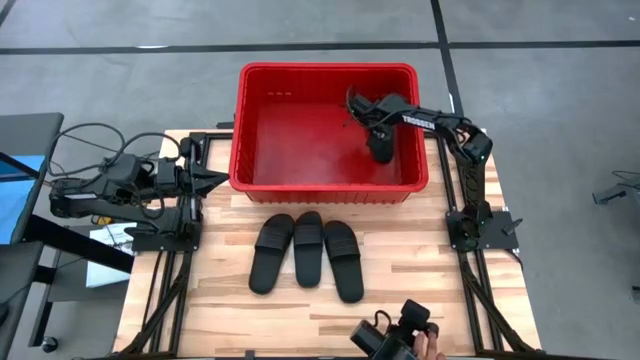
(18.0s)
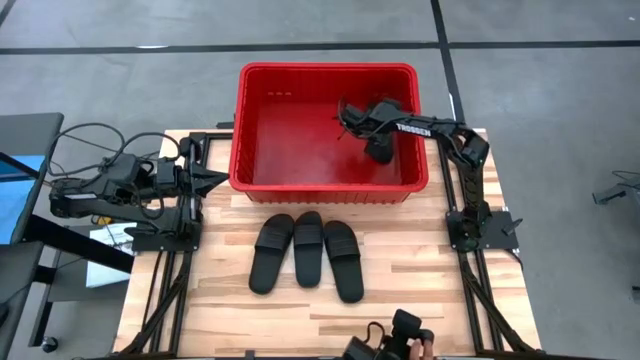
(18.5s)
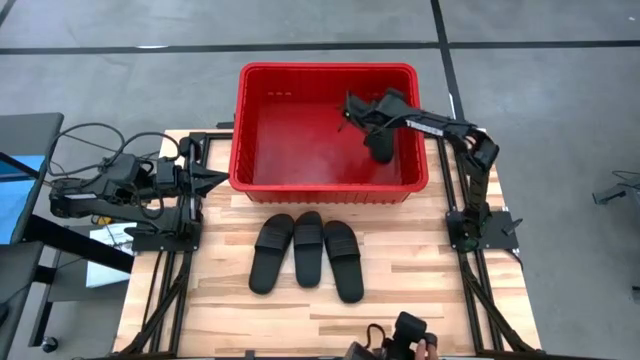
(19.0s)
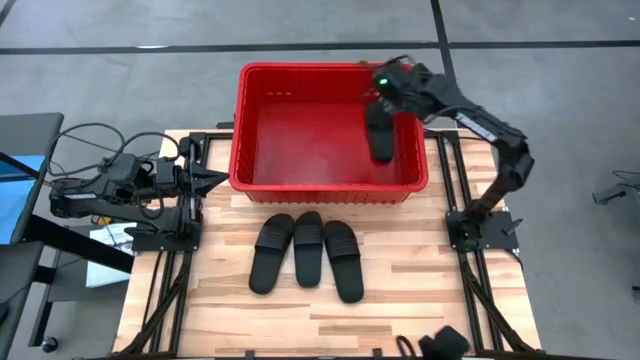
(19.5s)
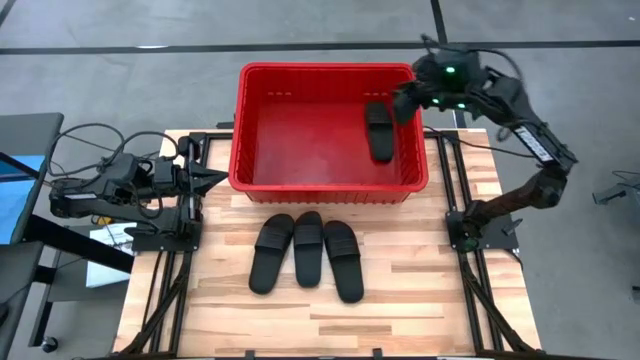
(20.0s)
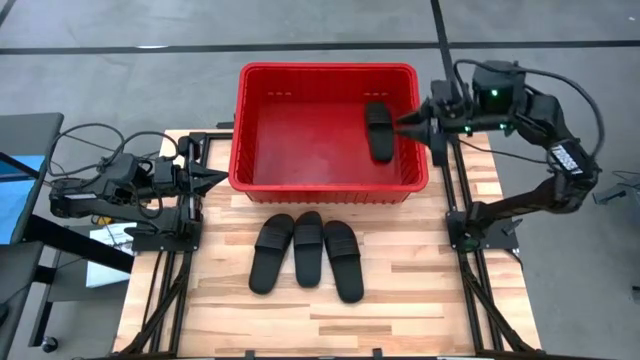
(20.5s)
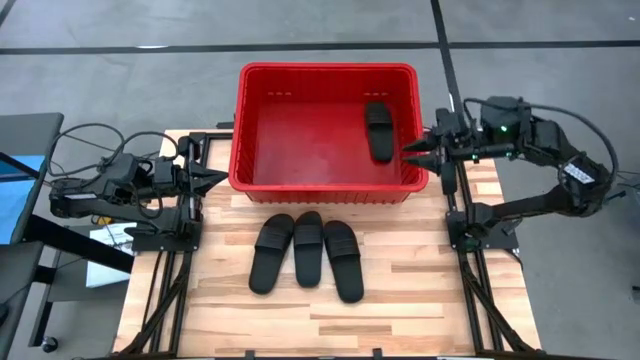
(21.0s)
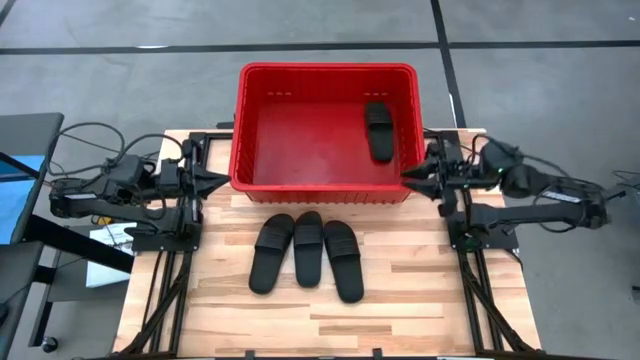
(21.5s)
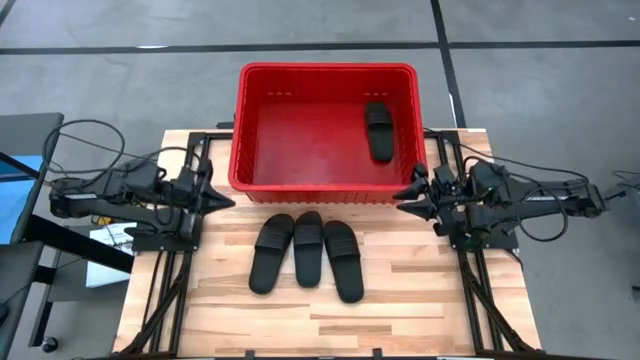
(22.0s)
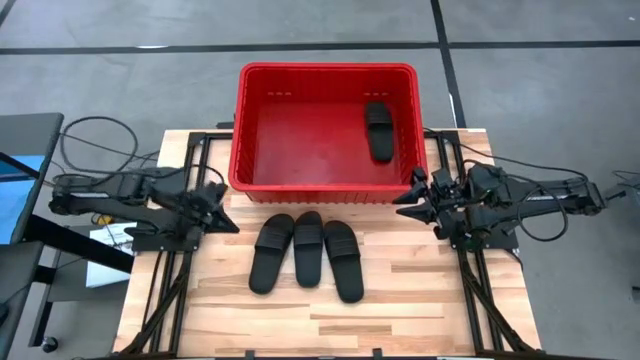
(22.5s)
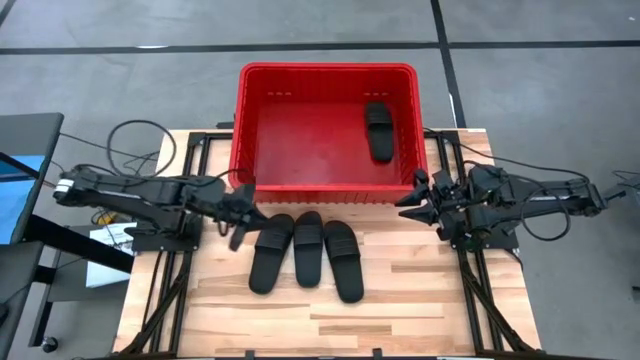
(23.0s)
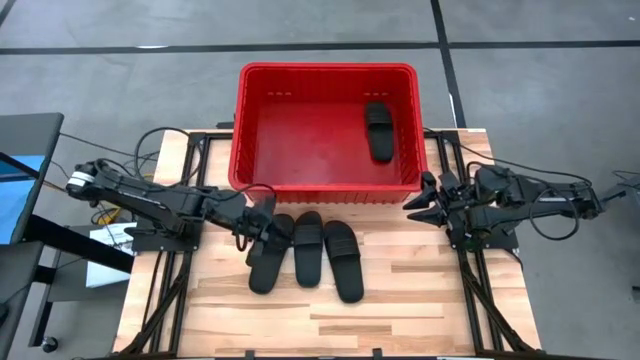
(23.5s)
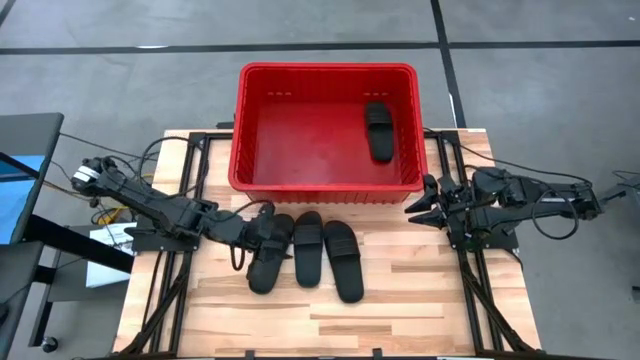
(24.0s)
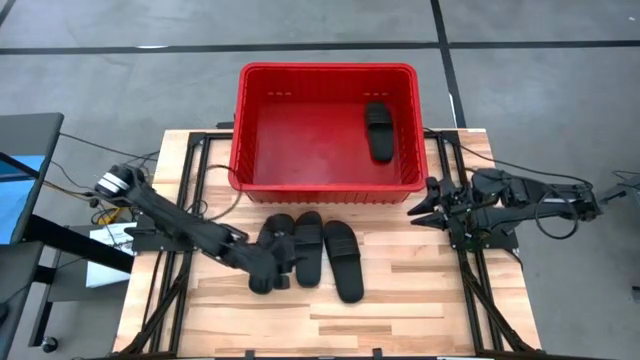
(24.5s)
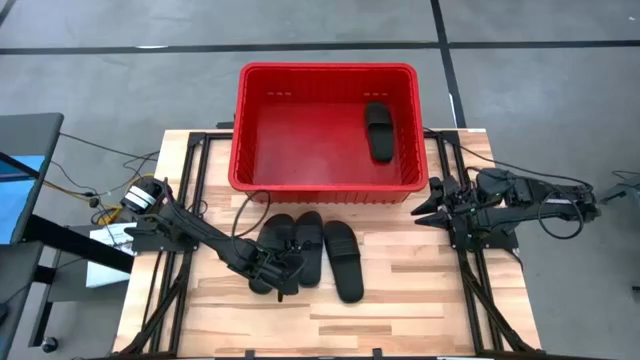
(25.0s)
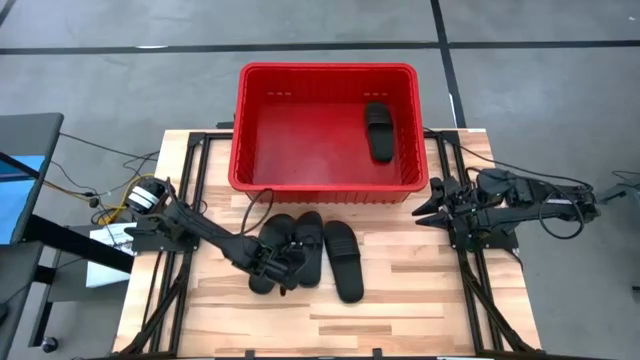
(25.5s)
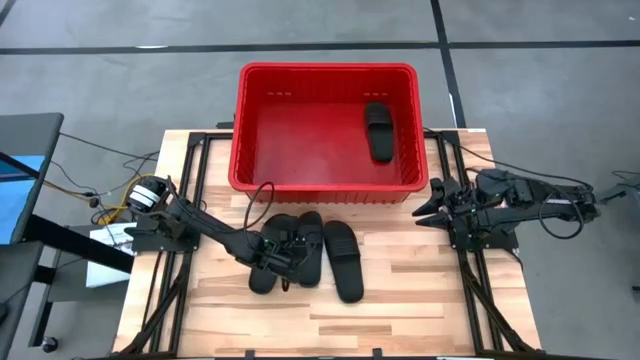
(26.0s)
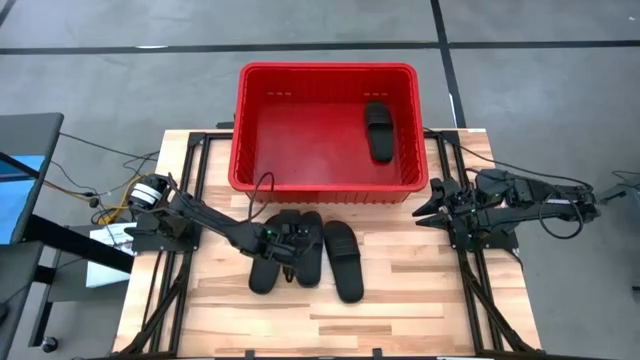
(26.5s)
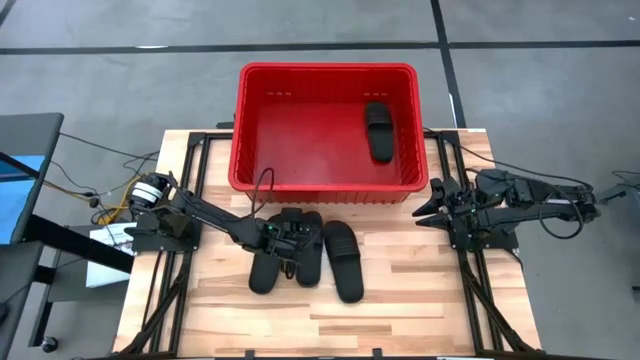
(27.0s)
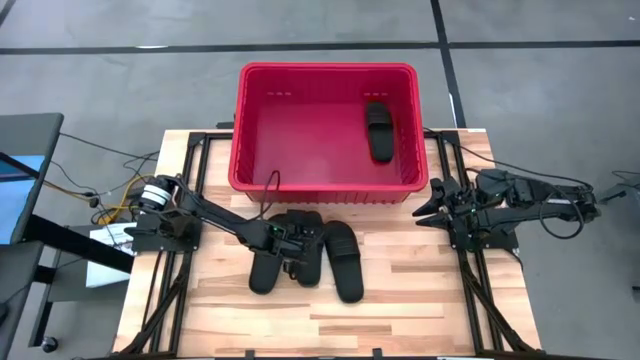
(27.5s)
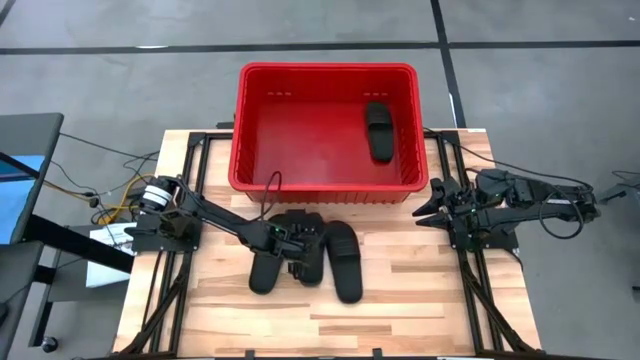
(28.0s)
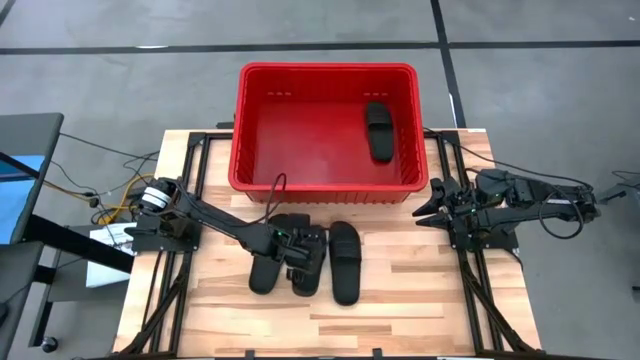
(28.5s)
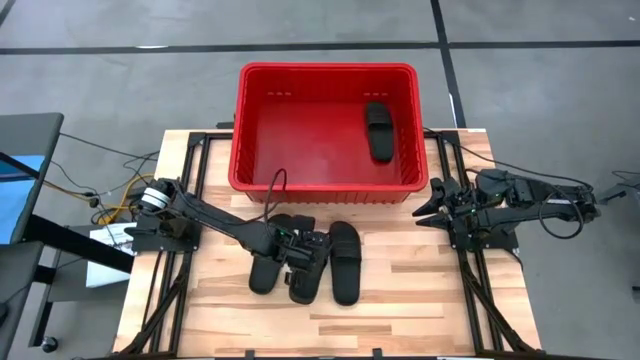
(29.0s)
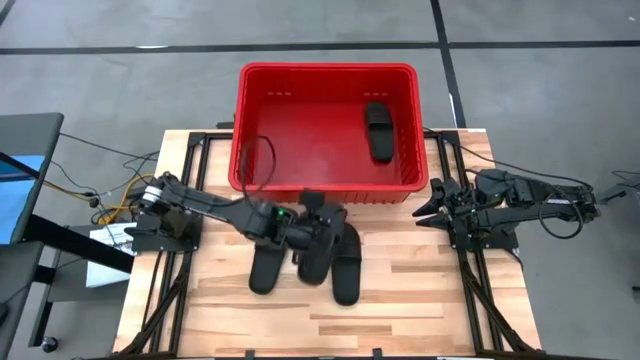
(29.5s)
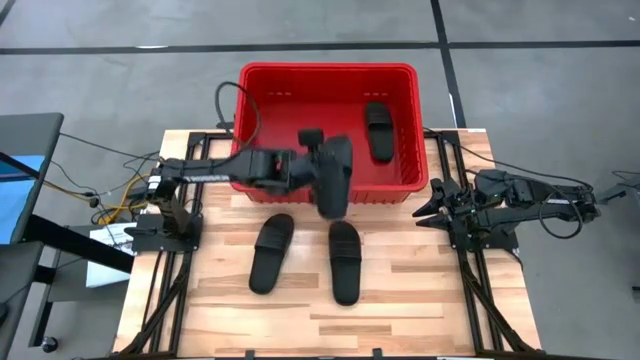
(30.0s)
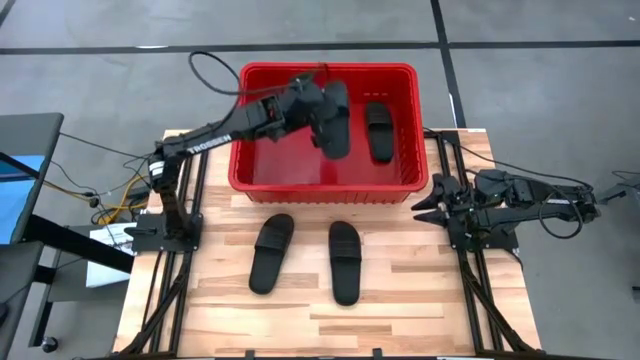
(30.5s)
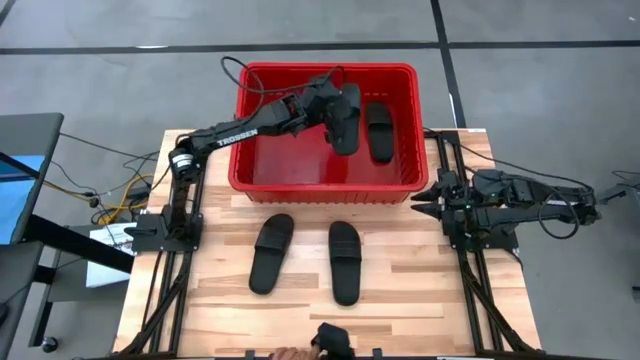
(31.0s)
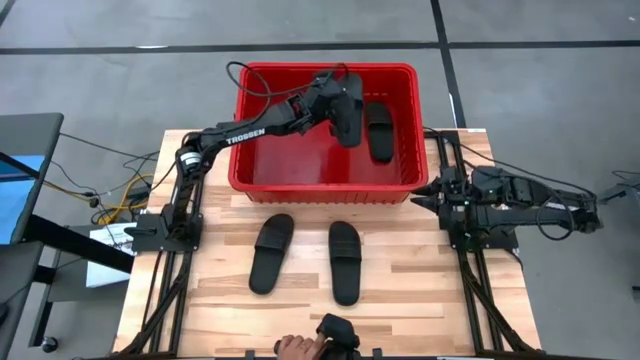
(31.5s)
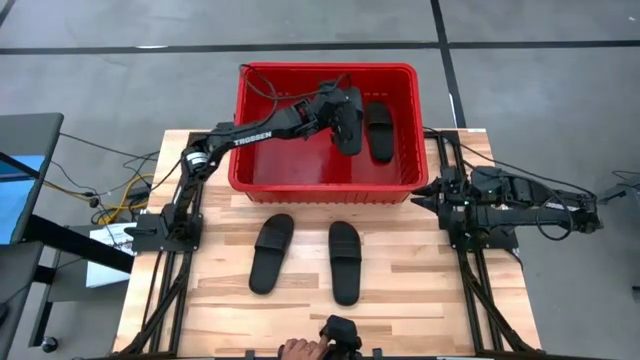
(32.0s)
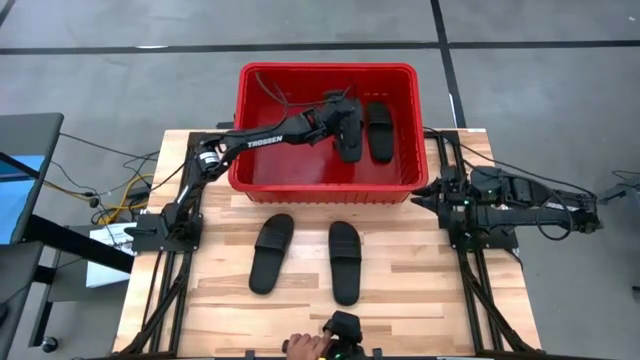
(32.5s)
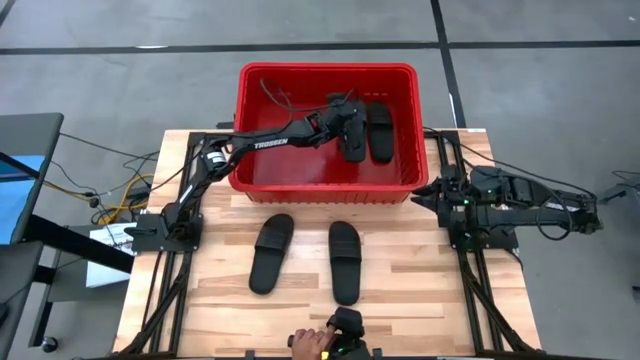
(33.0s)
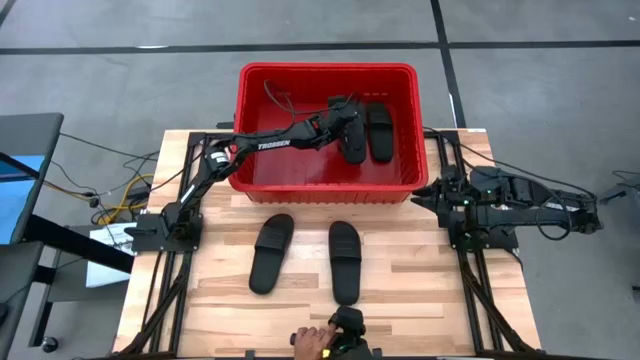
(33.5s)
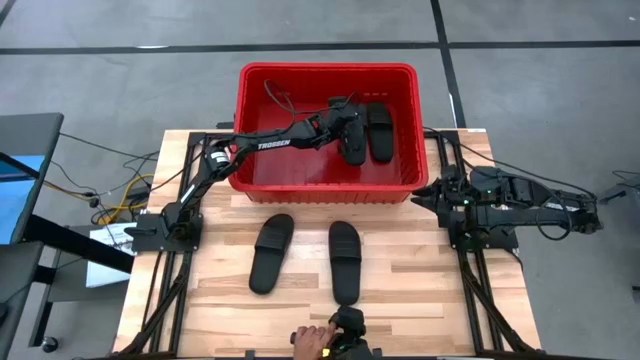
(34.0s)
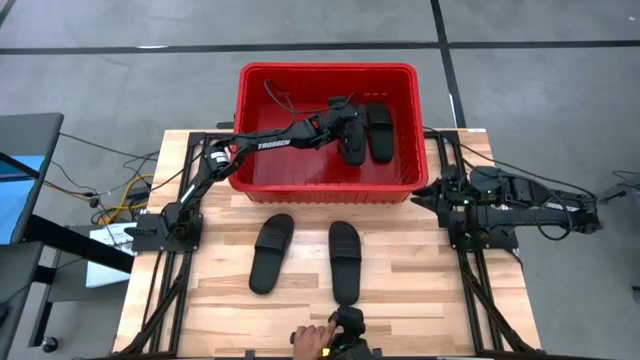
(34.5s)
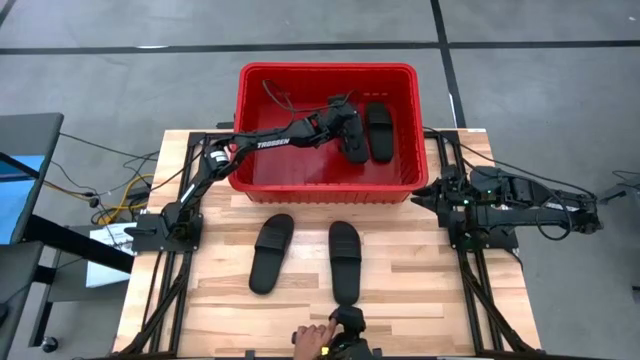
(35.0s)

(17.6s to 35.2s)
Task: Pick and place slides into bin
Put the black slide into the red container

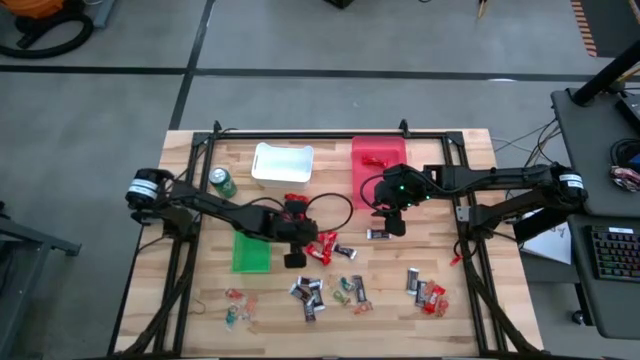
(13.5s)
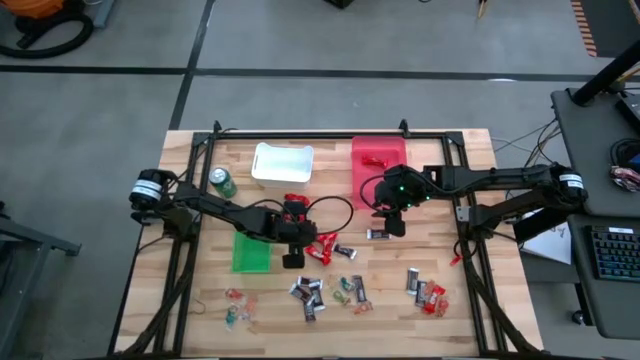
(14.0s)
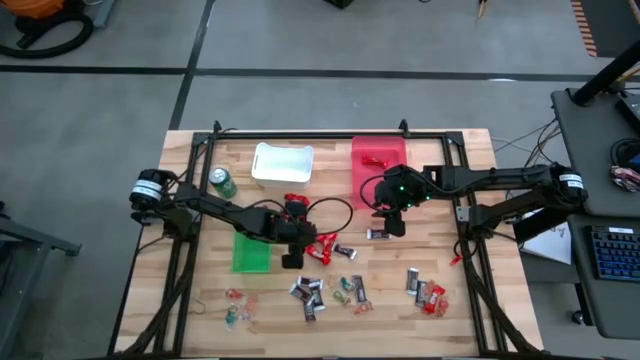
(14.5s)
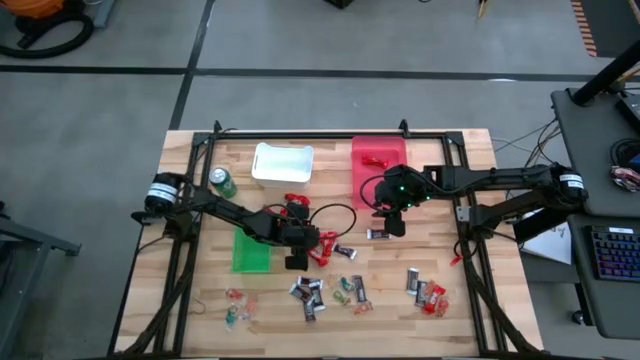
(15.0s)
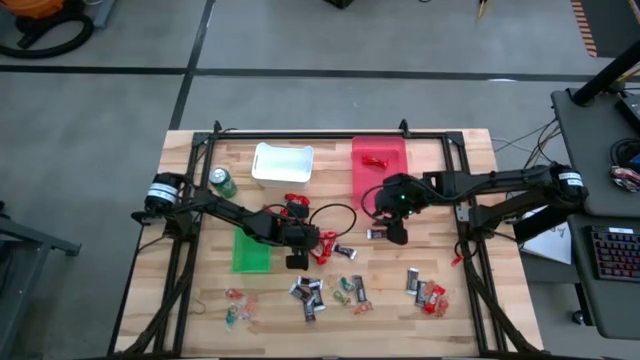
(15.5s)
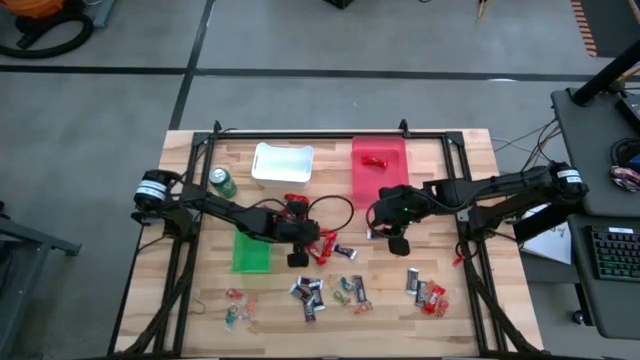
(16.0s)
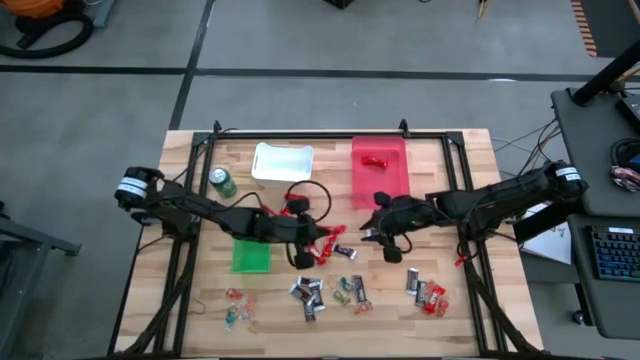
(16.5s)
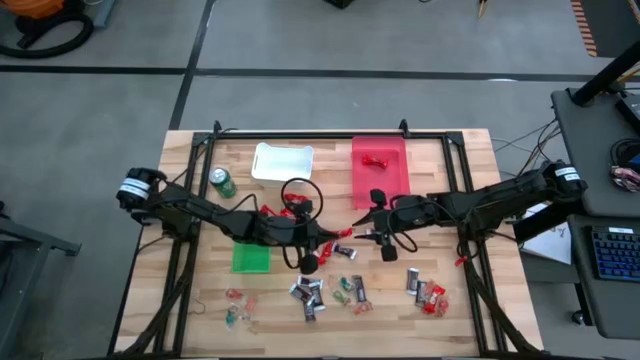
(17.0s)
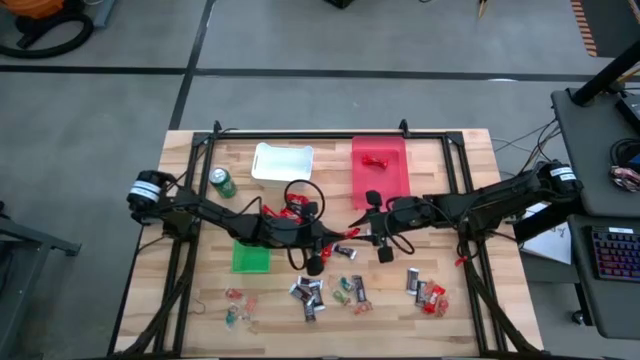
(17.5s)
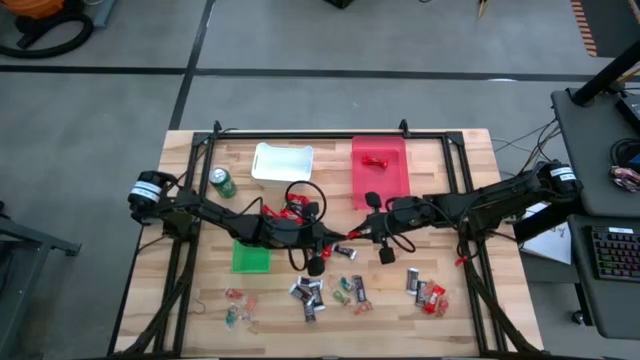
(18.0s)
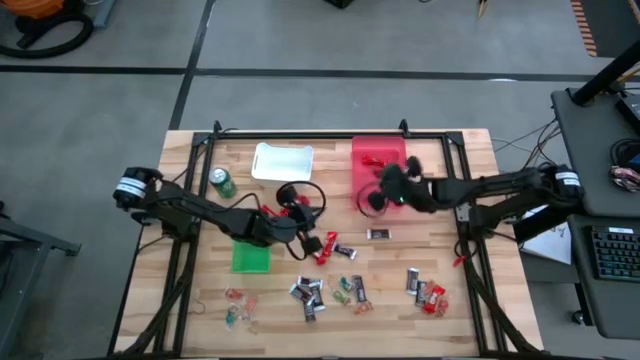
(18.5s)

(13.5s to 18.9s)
Task: Organize candy in baskets
Put the red chocolate into the pink bin
